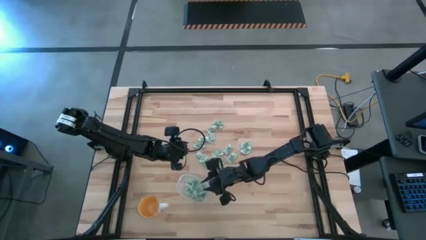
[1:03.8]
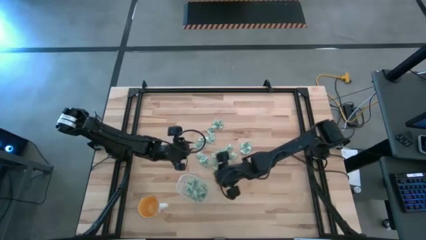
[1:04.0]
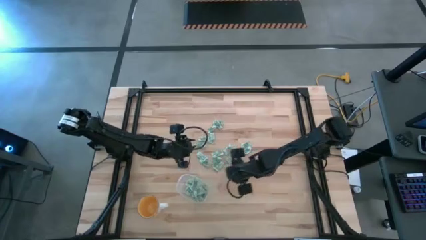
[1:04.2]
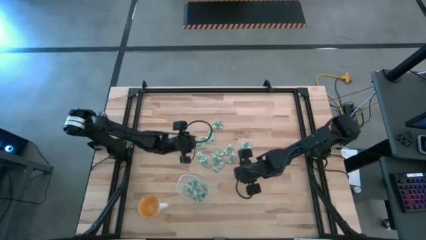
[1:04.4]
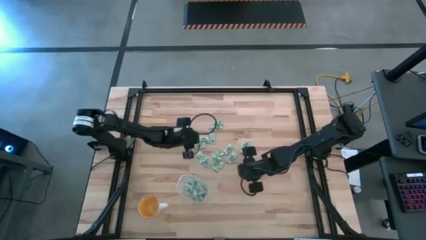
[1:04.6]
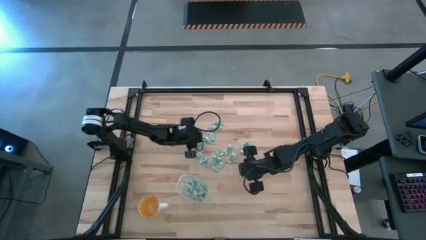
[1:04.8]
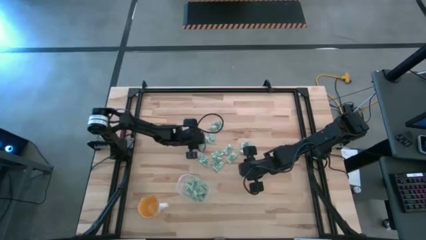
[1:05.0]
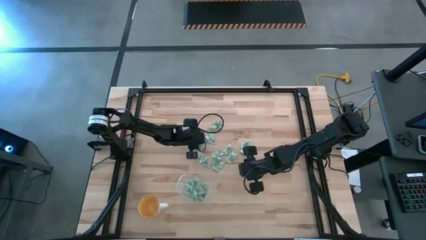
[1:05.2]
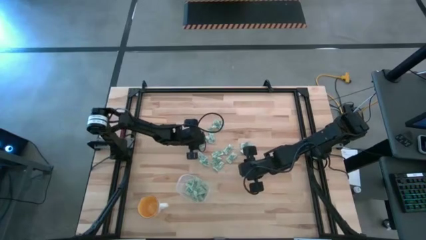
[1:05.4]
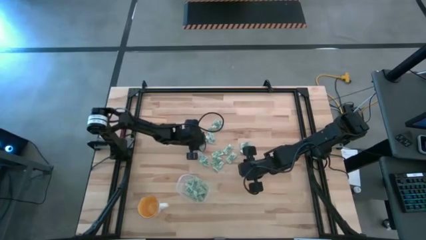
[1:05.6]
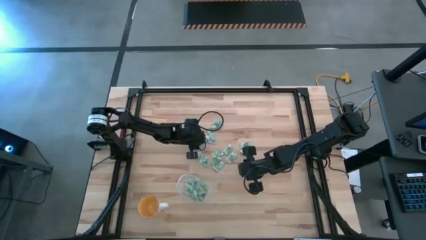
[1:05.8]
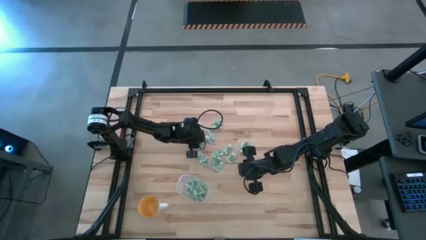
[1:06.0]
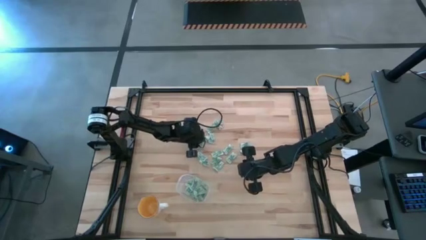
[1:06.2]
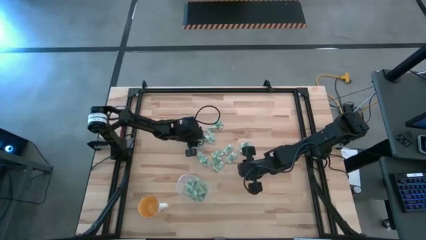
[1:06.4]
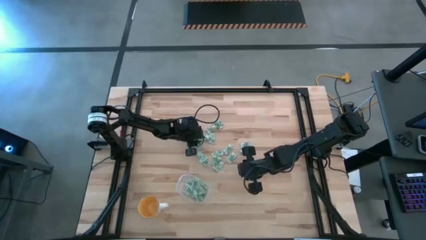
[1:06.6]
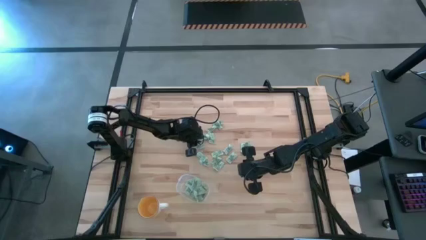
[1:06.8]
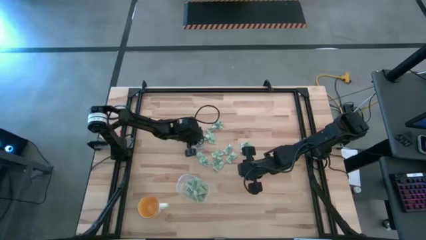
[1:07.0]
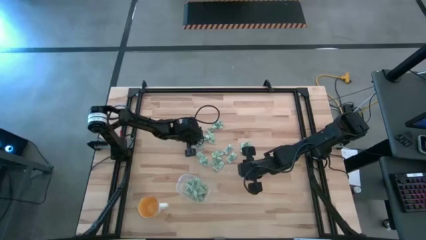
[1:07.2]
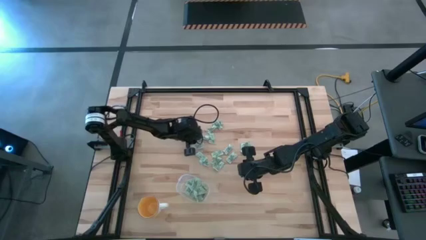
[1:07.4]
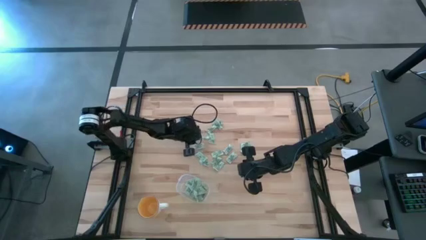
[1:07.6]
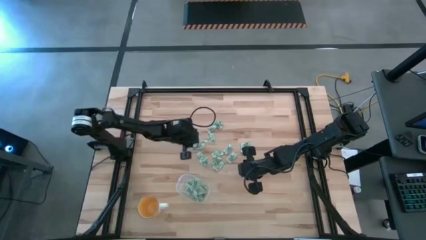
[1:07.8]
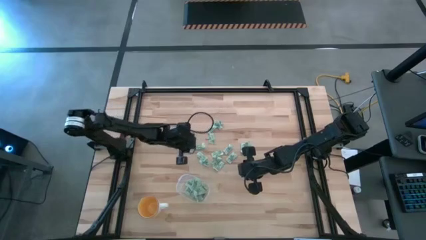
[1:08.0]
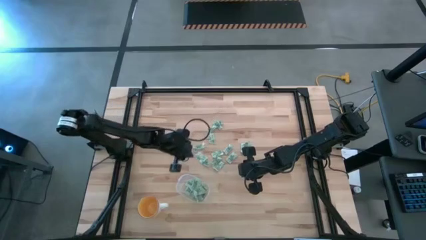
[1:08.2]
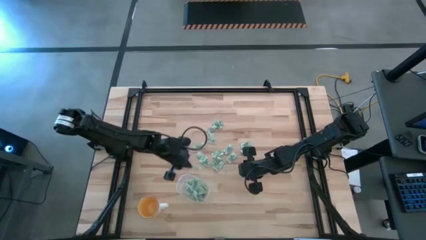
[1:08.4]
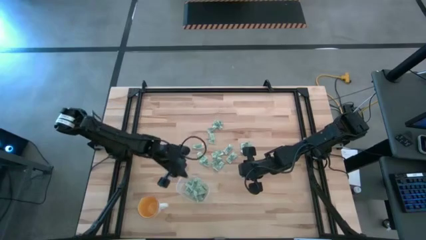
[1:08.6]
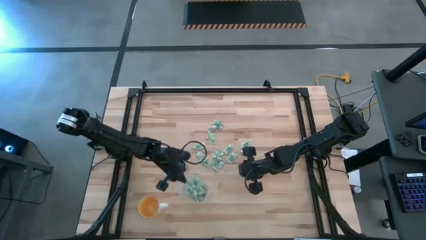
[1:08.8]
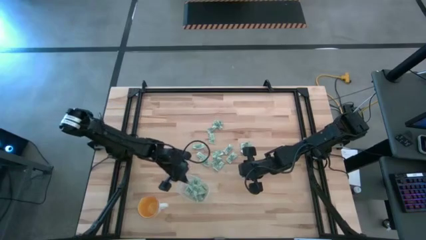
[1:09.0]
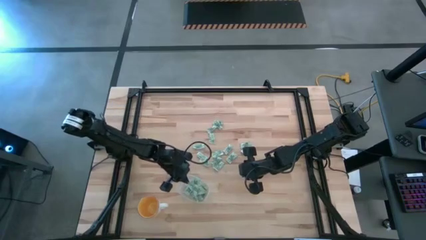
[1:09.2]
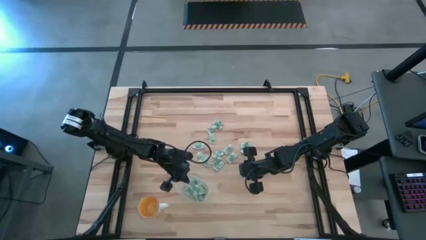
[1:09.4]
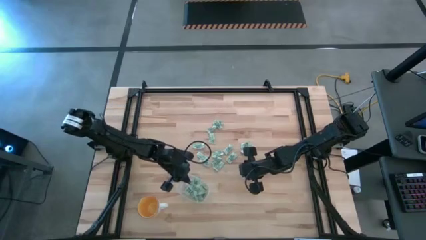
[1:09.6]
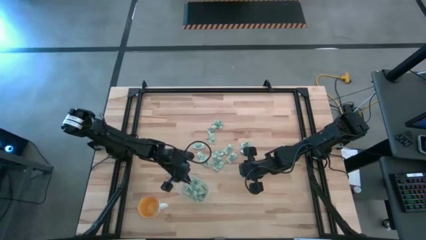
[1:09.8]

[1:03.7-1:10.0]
Task: Pick and place Stevia / Truvia into bins
Put the stevia packet into the transparent container

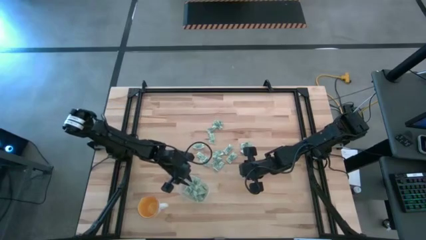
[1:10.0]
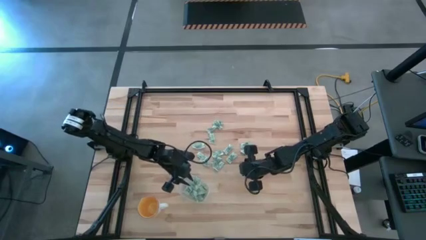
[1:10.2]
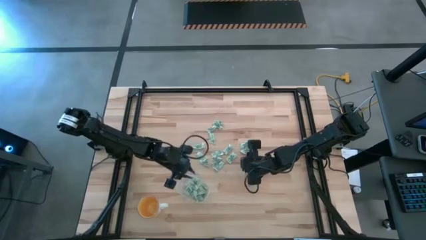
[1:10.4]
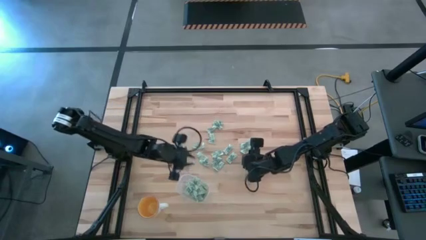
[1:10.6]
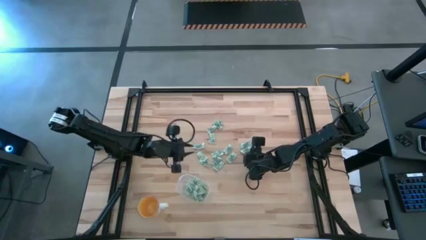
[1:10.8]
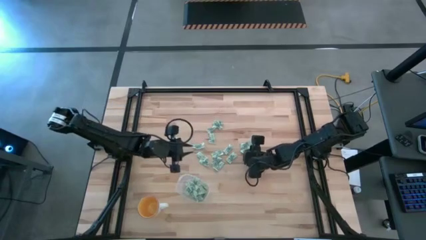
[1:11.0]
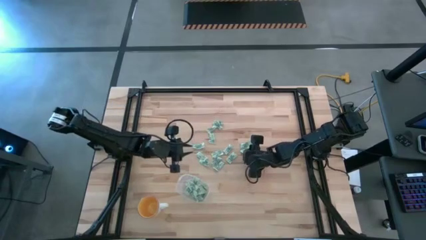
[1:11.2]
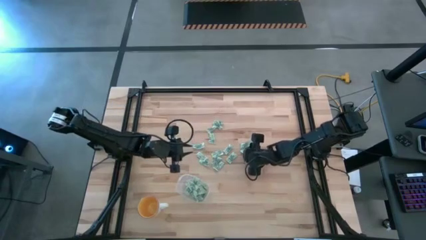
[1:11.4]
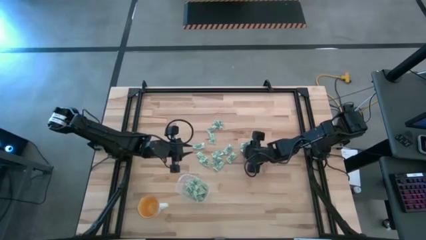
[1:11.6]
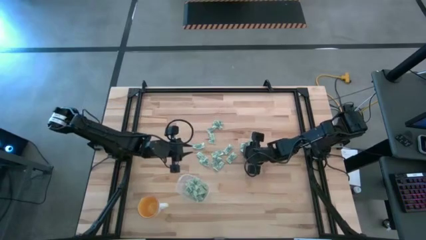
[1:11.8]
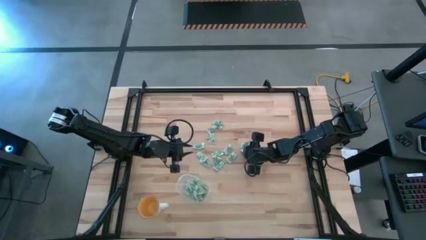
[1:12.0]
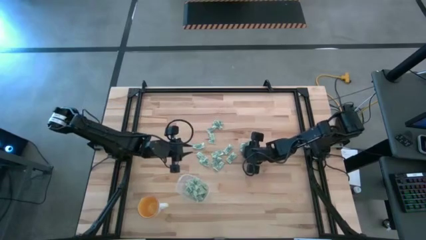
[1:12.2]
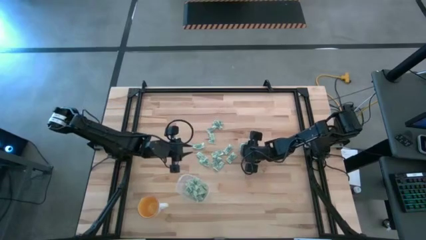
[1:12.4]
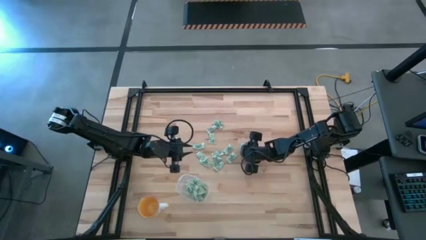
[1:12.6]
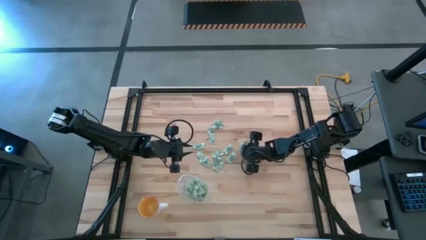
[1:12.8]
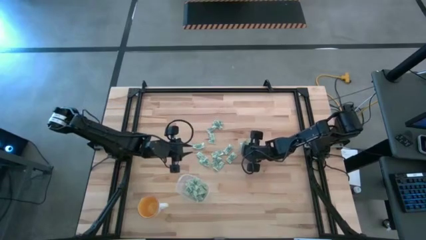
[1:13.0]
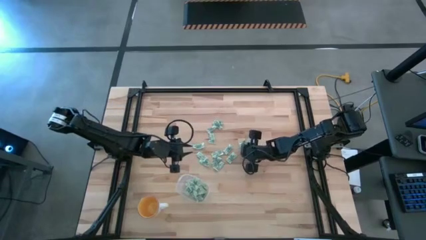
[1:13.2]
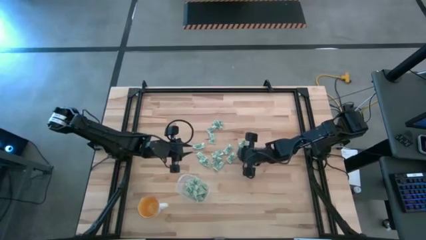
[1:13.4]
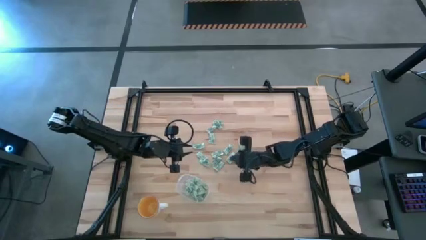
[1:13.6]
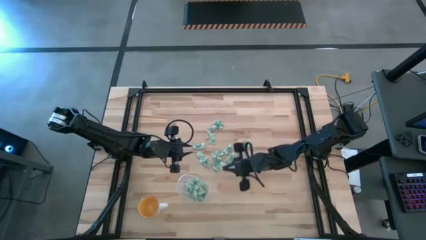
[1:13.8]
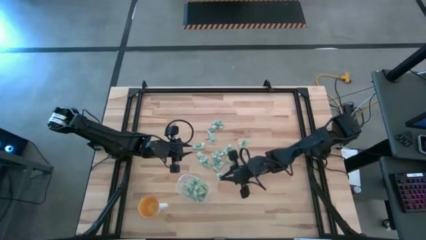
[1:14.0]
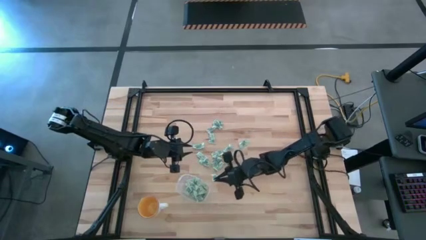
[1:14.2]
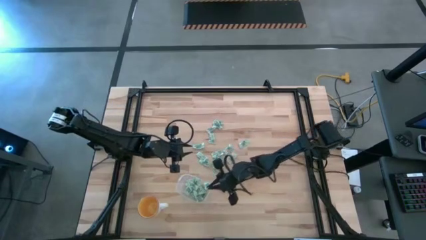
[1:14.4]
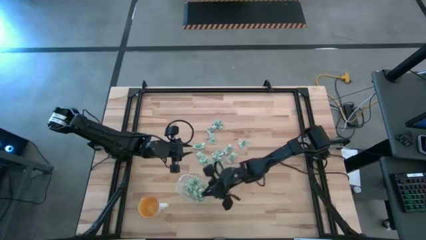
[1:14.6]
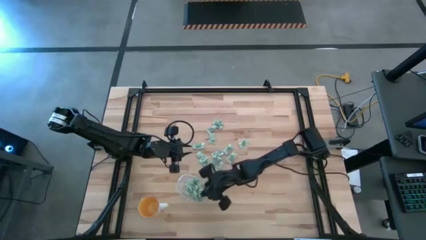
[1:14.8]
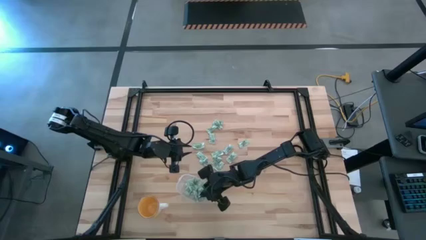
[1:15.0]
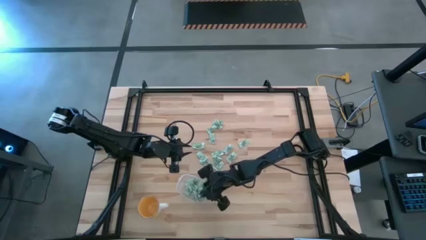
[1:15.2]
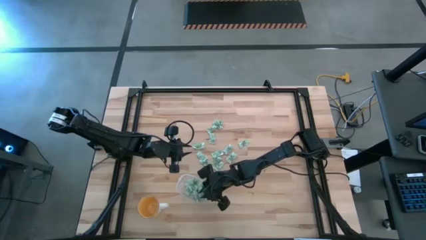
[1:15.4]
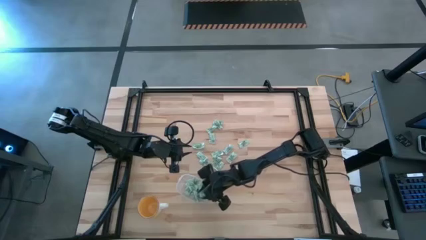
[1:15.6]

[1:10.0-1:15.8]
Put the stevia packet into the transparent container

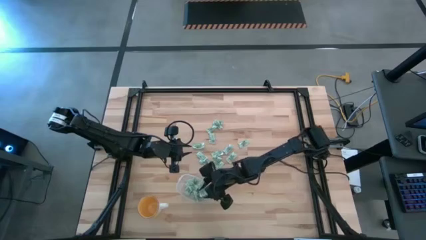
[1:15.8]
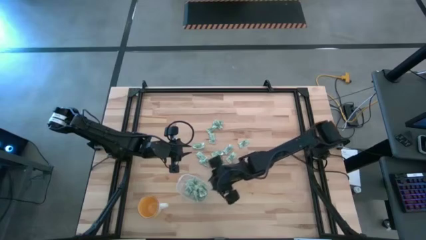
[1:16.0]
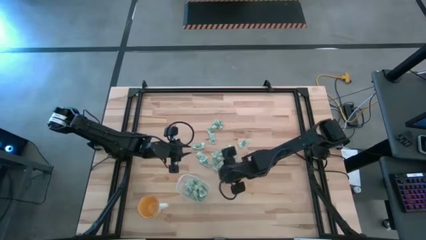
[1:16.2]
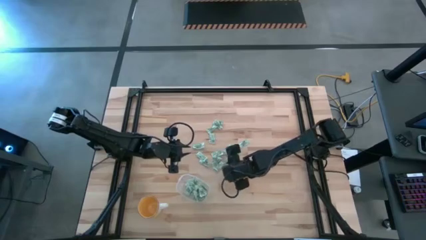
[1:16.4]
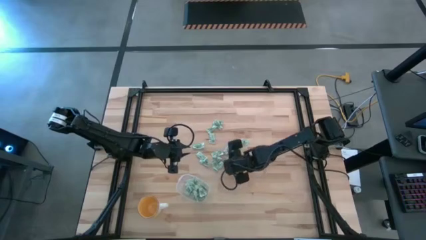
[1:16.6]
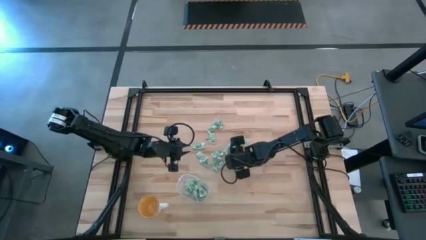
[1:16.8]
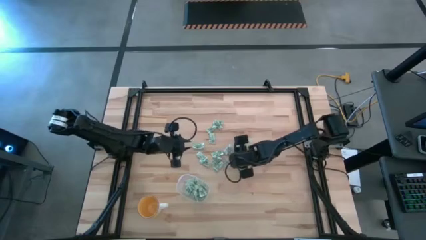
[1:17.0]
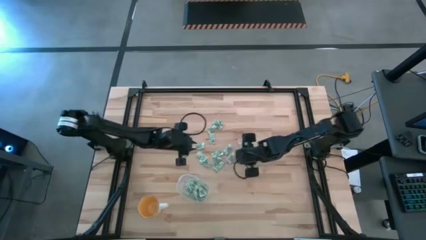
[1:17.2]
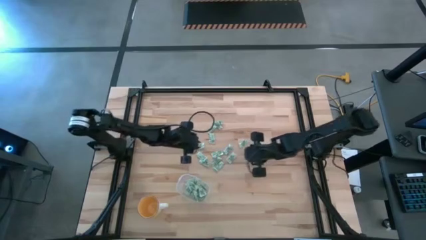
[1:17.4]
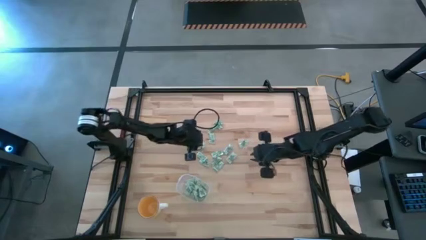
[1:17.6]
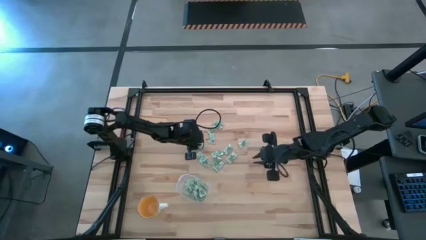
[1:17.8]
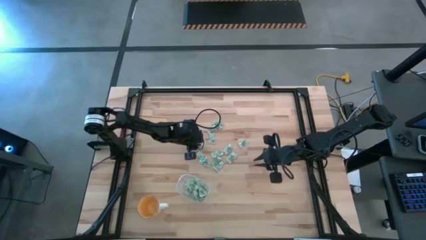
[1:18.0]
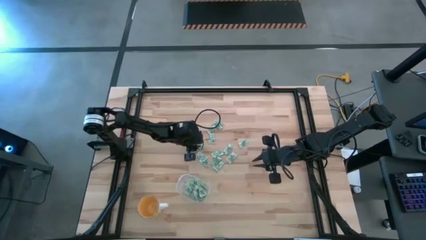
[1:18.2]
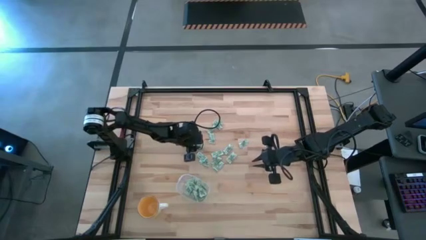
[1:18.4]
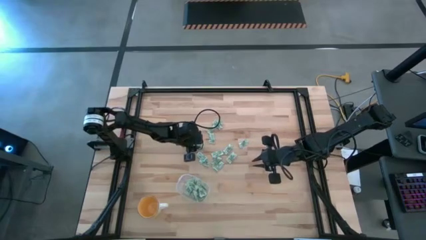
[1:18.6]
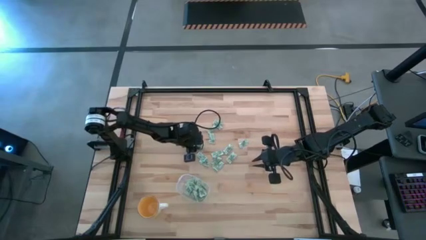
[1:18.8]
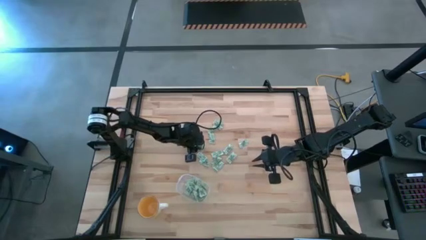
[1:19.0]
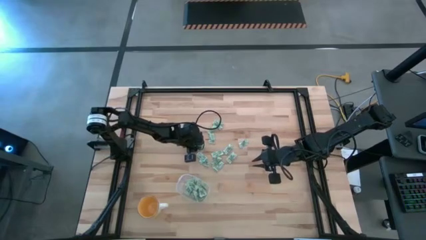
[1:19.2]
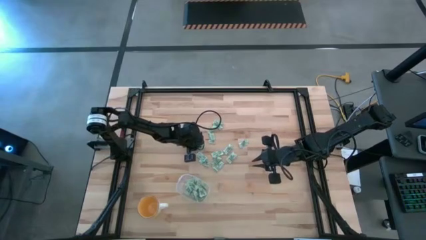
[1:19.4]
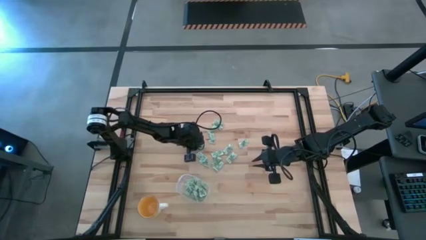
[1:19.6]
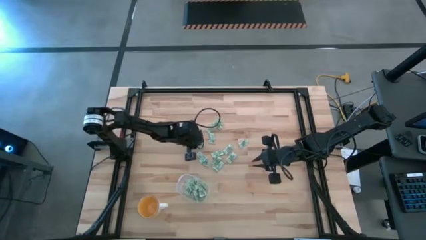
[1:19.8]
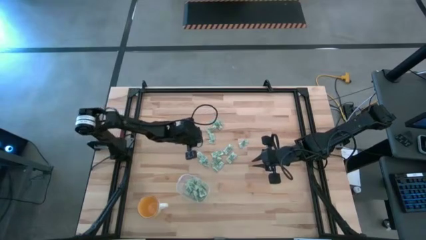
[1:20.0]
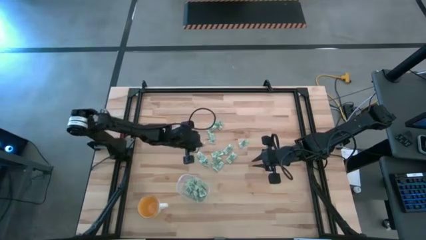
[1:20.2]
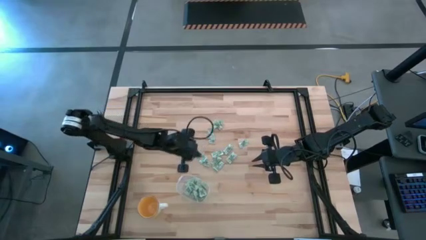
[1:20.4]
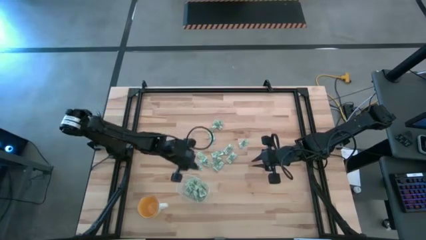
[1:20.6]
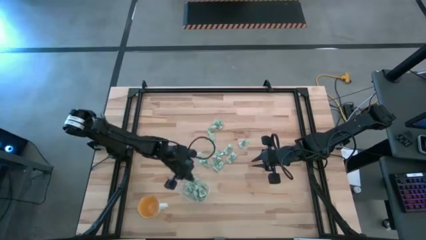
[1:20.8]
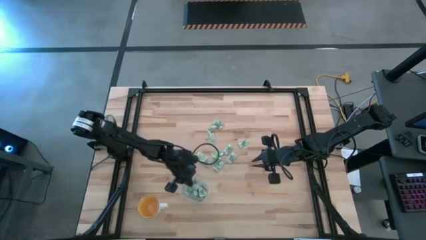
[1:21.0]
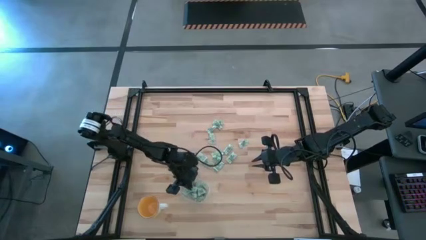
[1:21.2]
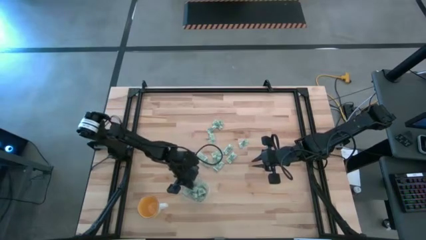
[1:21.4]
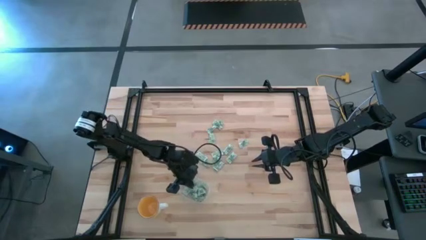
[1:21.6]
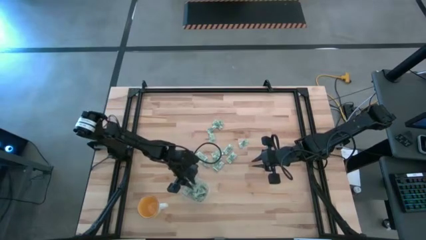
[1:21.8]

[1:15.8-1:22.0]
Put the stevia packet into the transparent container
